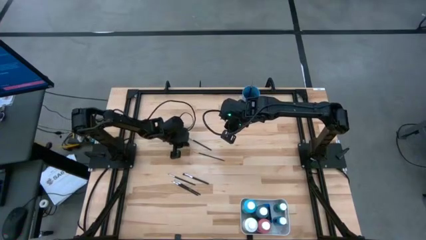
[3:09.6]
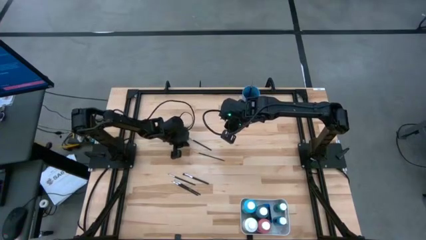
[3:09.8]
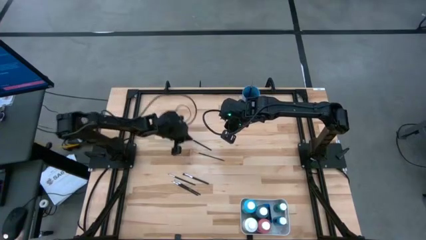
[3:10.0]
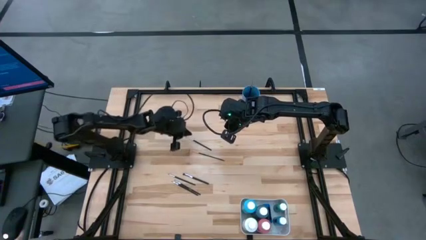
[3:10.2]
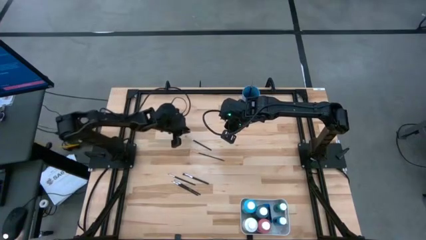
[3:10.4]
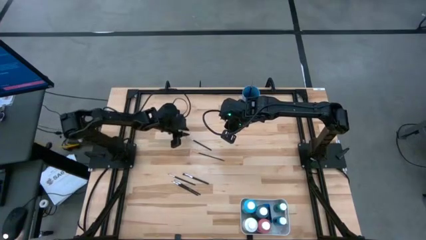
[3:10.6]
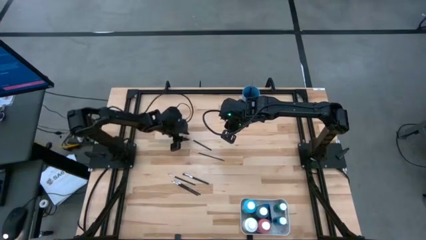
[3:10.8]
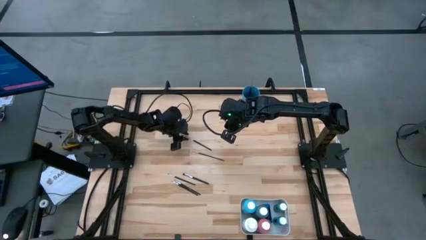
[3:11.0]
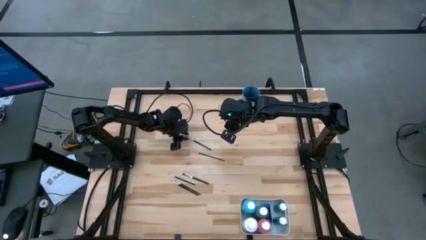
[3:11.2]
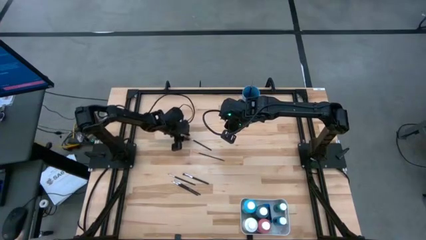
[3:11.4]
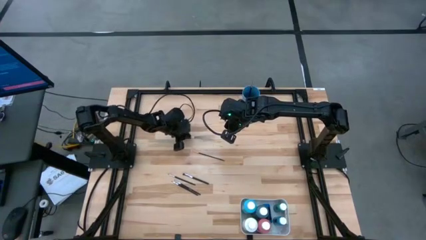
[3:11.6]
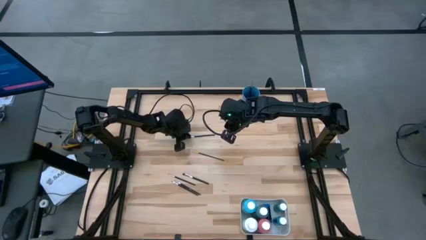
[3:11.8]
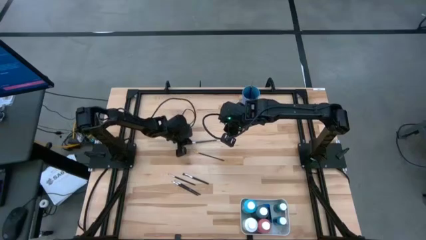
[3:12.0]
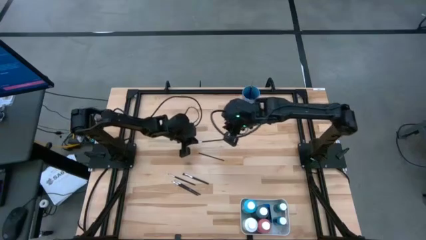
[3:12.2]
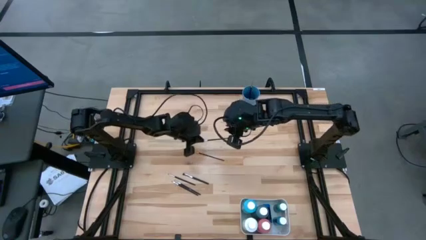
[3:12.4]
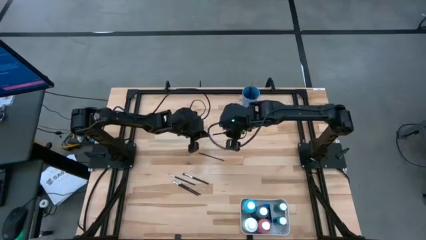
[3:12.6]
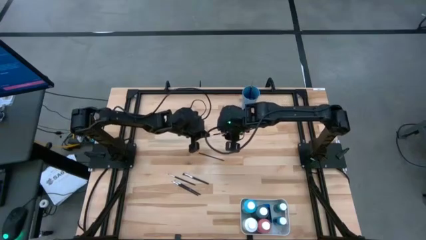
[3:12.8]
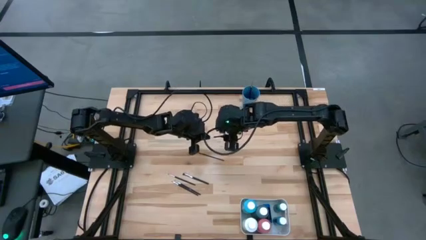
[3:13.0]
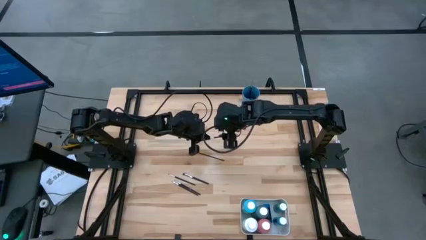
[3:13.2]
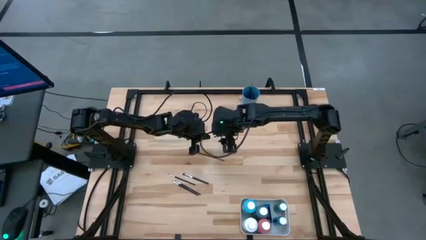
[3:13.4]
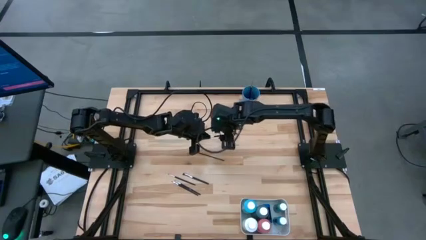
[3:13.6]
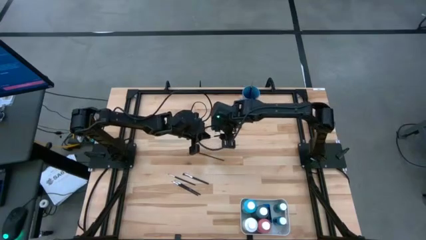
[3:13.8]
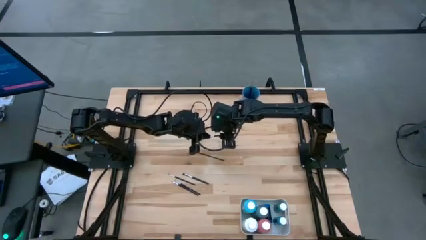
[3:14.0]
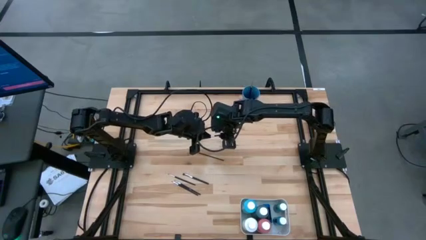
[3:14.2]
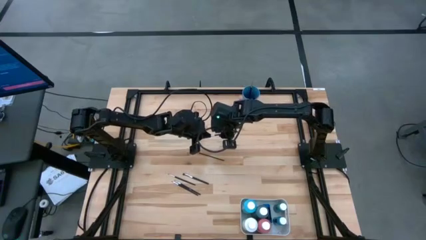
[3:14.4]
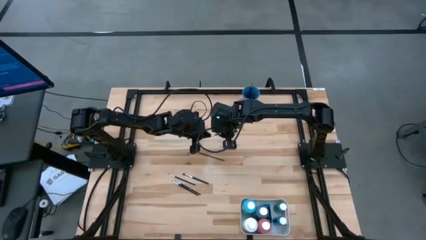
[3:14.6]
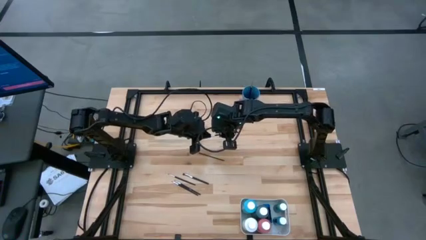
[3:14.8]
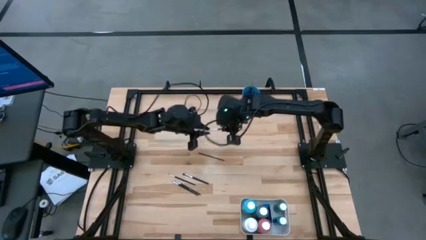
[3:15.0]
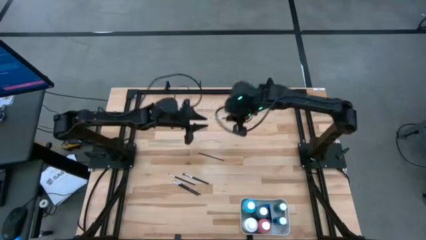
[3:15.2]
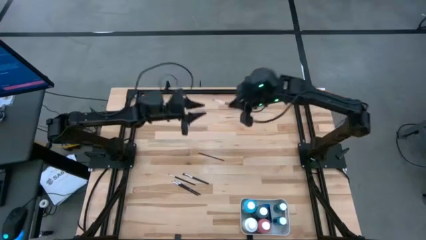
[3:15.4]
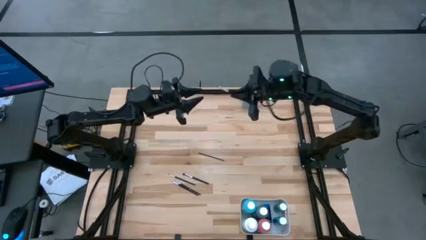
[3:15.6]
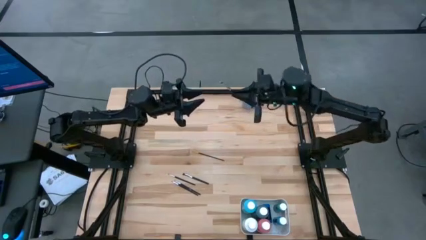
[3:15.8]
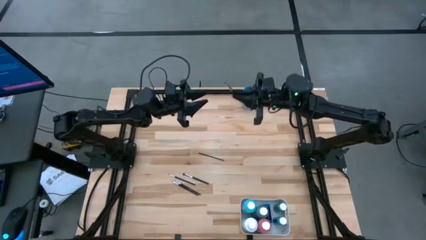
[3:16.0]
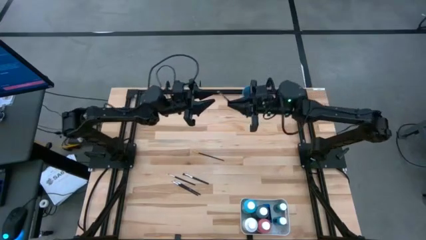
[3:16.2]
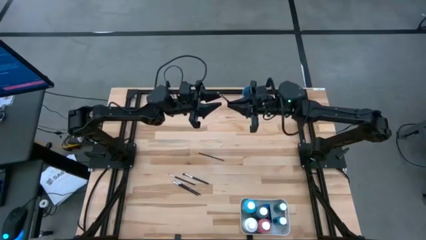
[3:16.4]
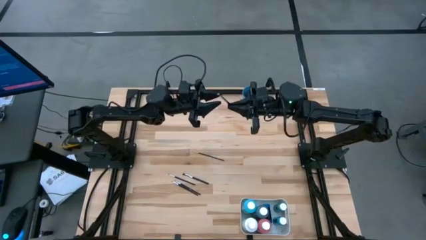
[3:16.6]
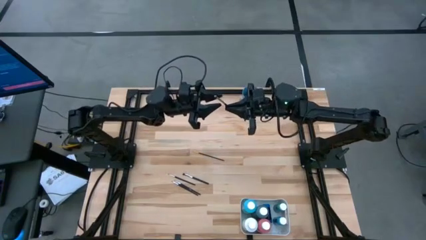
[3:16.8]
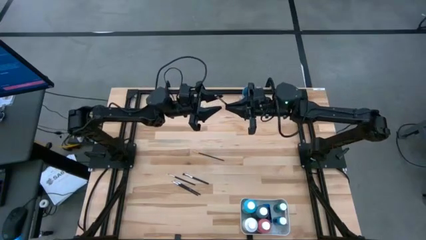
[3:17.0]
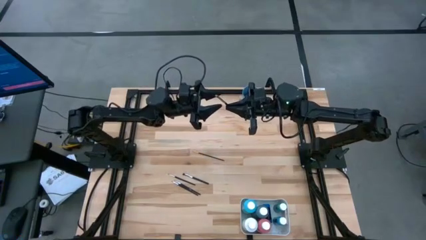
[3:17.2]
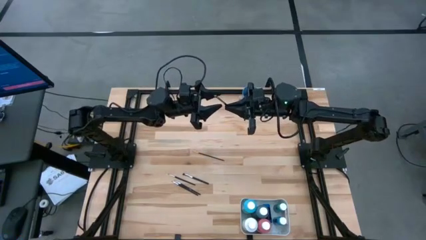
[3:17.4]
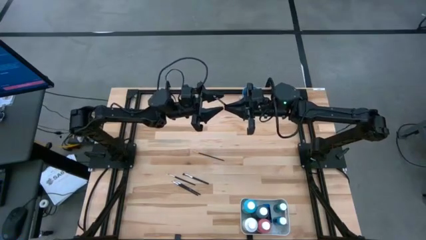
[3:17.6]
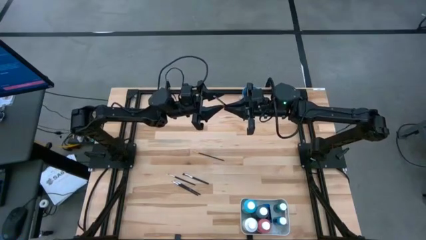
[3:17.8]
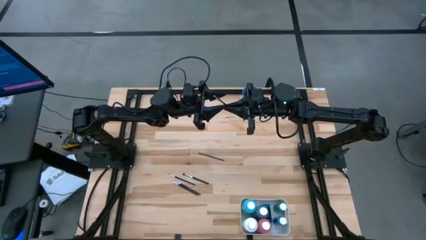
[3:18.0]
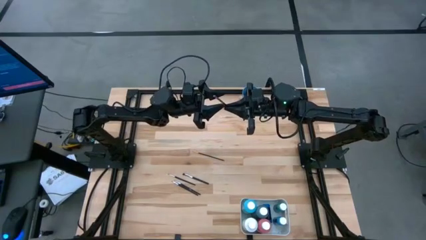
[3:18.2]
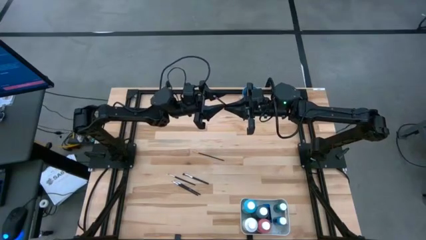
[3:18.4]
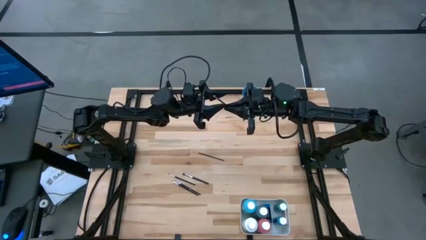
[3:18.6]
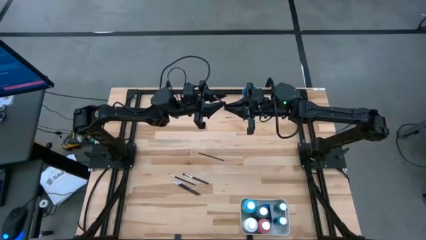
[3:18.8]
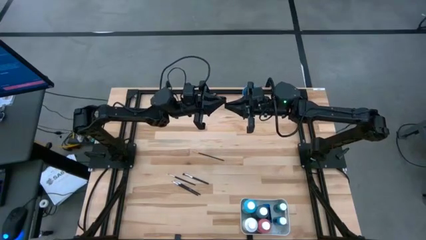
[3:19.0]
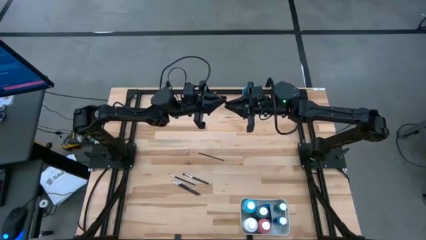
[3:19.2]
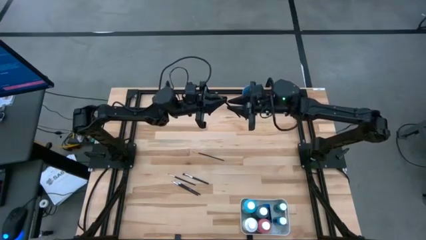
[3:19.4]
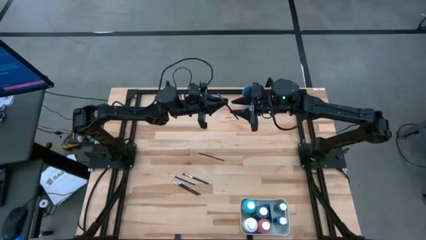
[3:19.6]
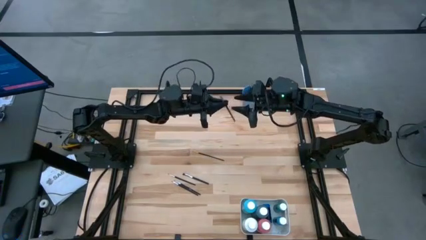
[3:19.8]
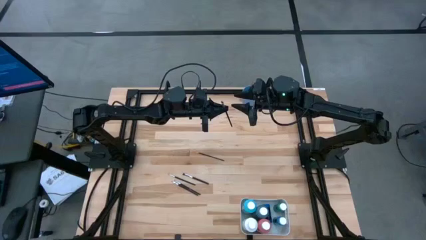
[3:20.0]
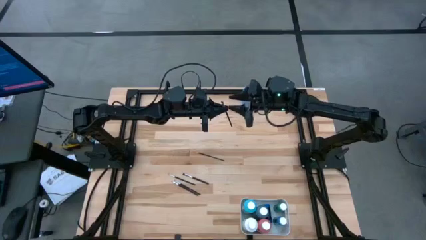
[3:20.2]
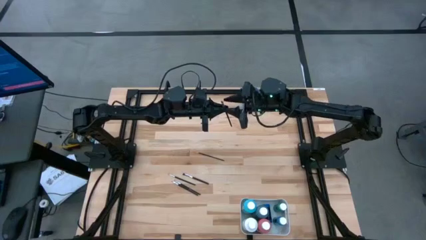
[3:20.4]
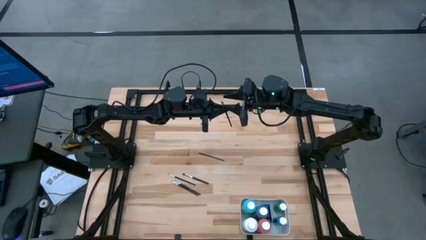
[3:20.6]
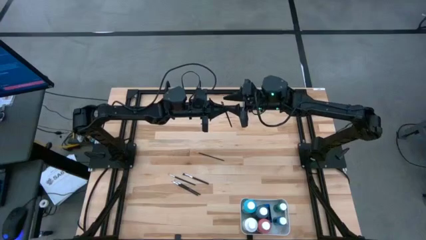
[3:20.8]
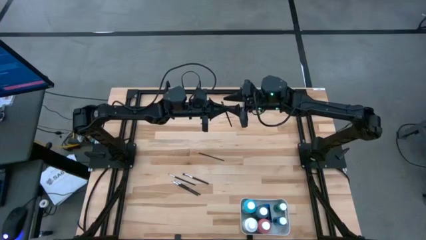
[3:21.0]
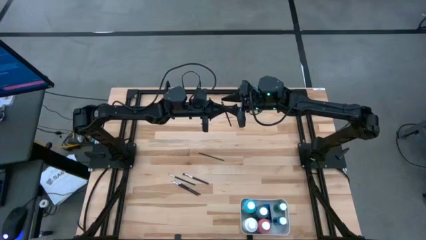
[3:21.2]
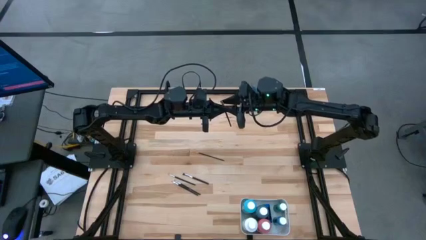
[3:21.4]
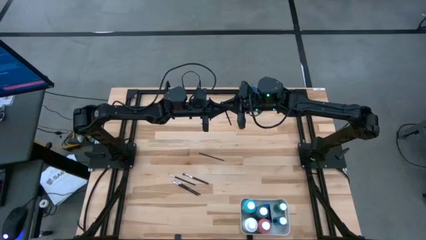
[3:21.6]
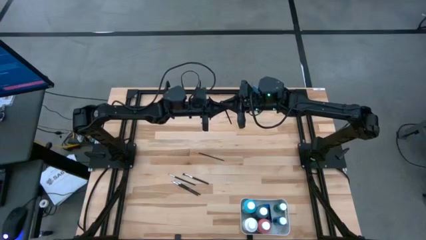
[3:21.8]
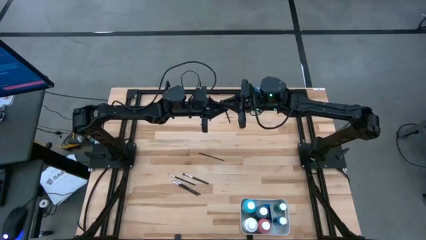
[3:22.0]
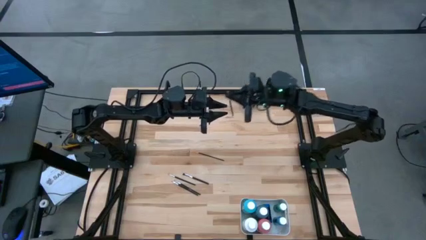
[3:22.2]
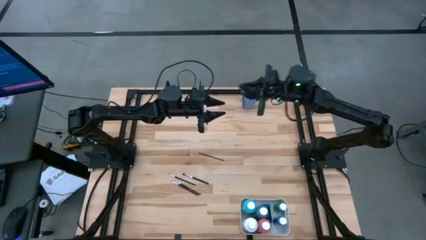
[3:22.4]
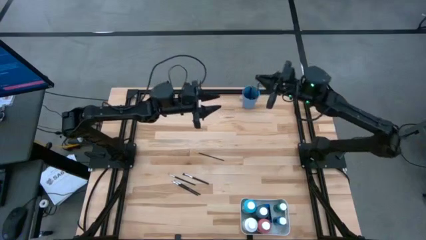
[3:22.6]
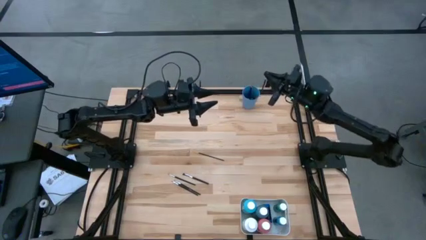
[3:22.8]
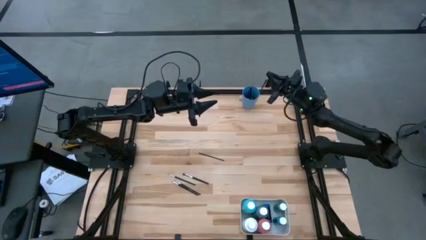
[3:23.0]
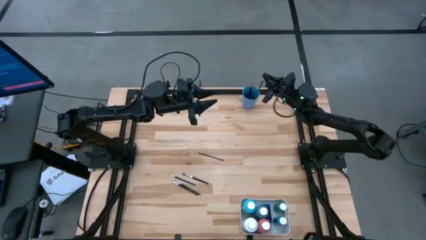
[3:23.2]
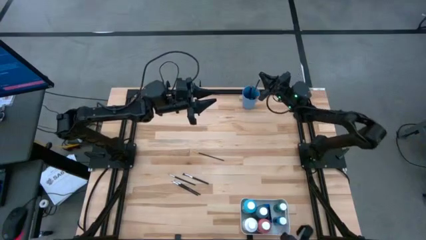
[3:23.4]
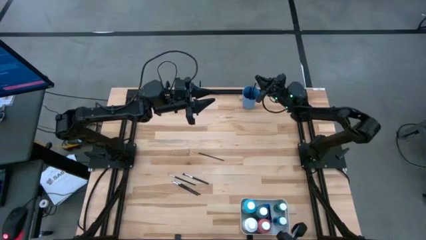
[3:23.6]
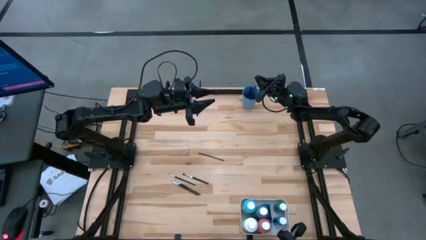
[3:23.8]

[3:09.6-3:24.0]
Task: Pick & Place Paint Supplies
Put the silver paintbrush into the blue cup
